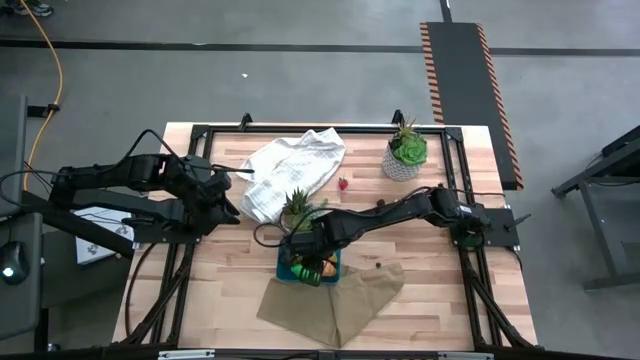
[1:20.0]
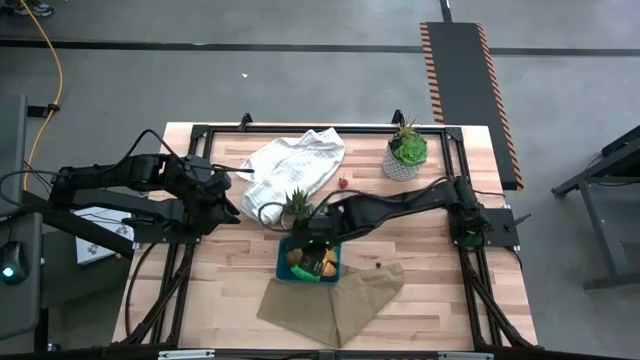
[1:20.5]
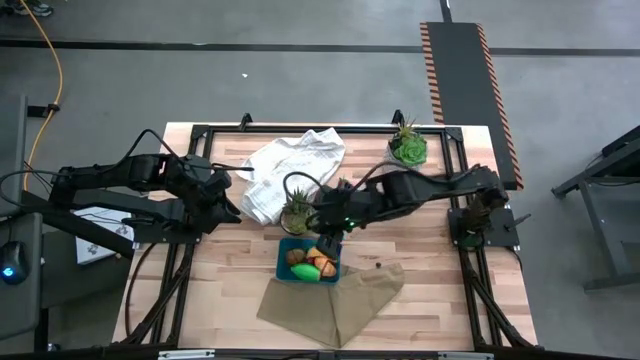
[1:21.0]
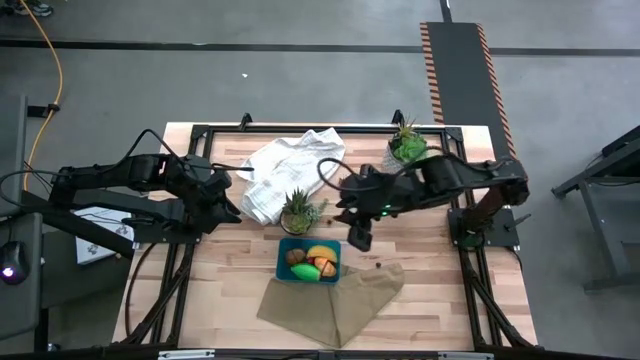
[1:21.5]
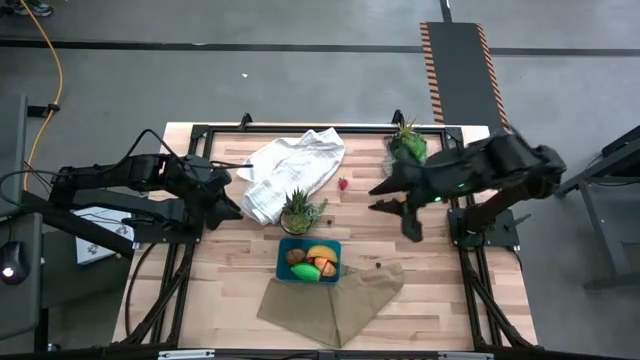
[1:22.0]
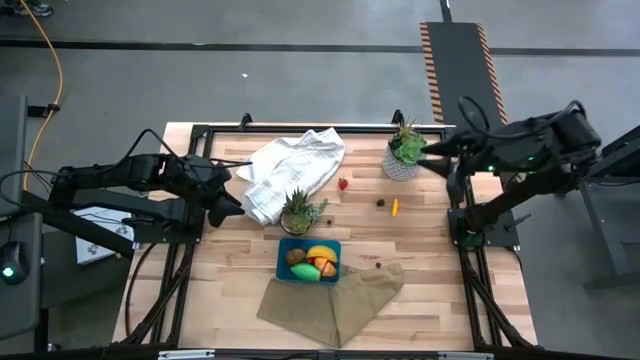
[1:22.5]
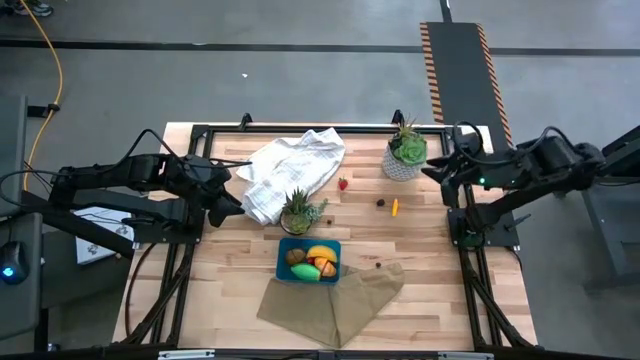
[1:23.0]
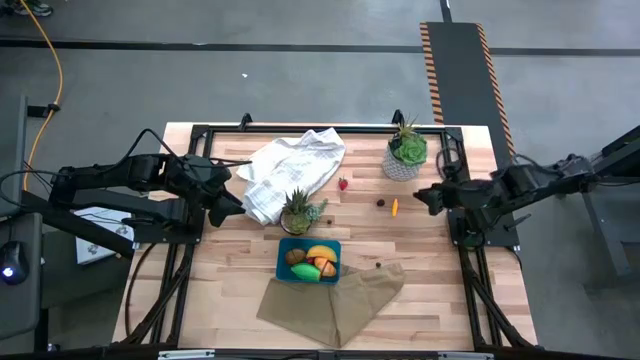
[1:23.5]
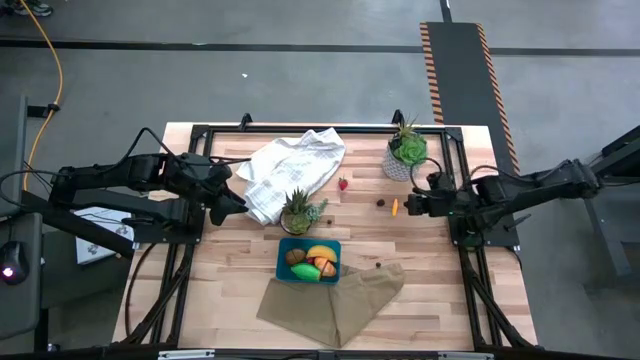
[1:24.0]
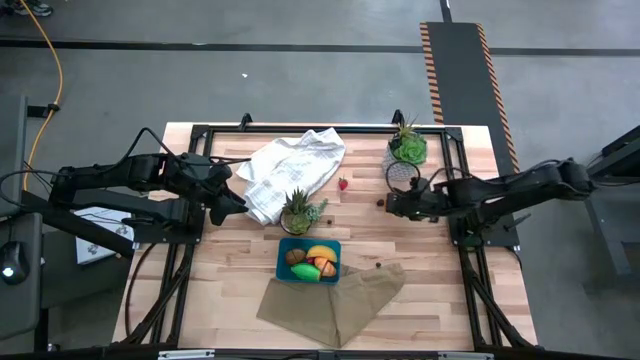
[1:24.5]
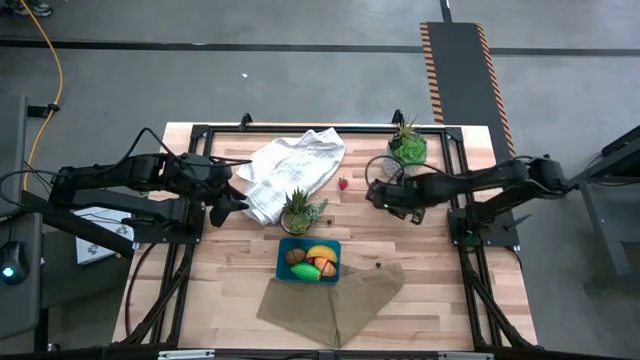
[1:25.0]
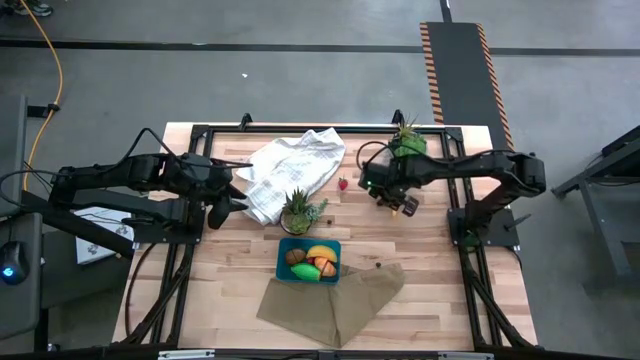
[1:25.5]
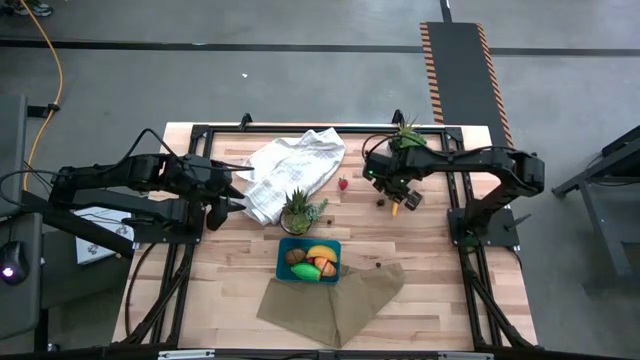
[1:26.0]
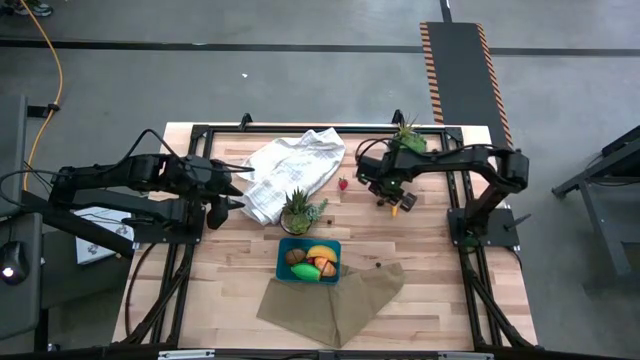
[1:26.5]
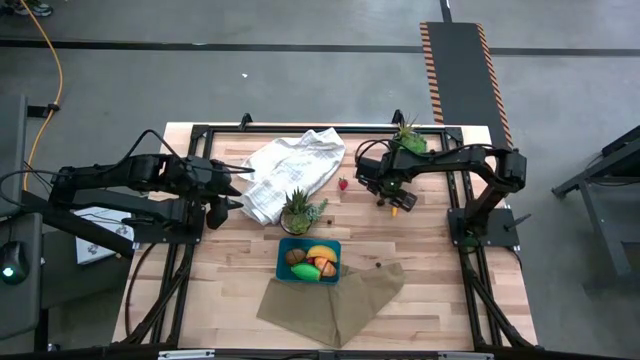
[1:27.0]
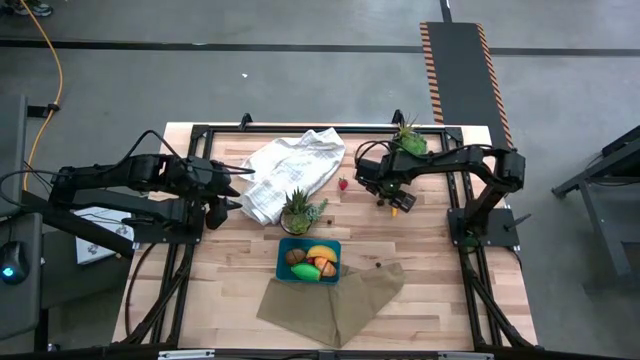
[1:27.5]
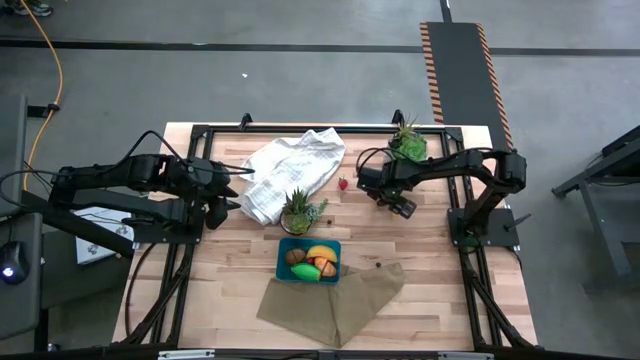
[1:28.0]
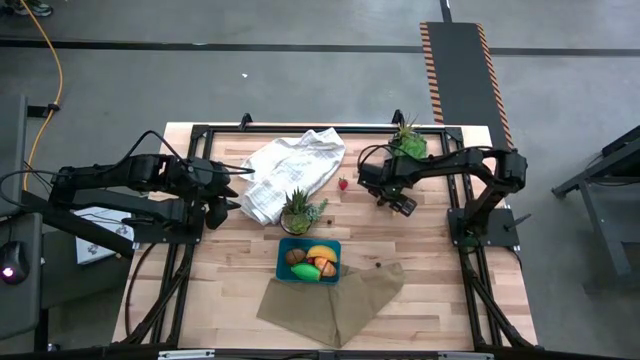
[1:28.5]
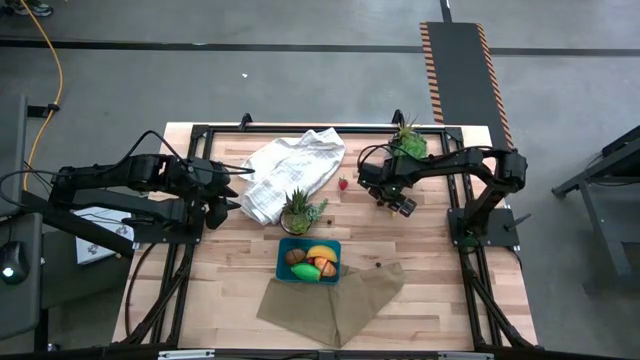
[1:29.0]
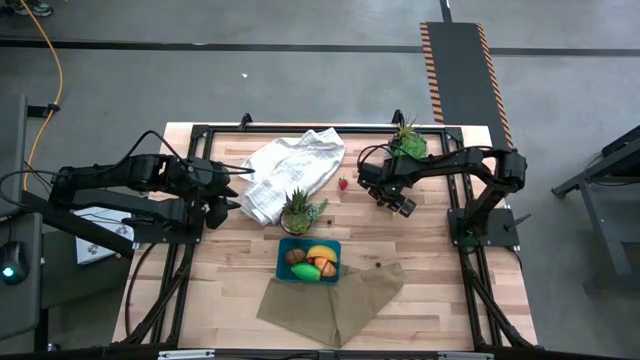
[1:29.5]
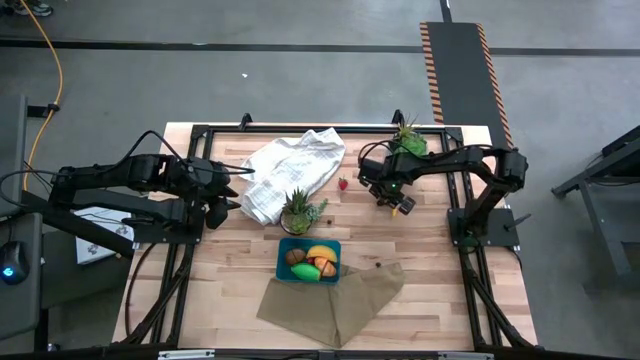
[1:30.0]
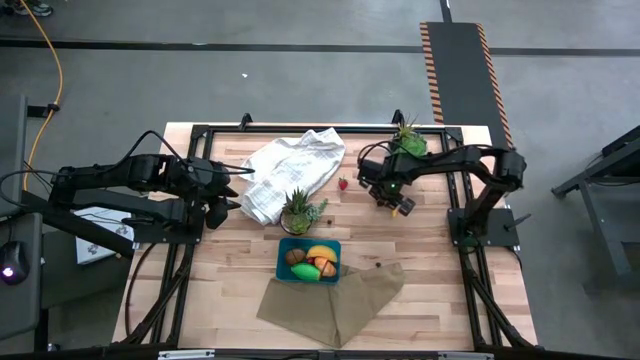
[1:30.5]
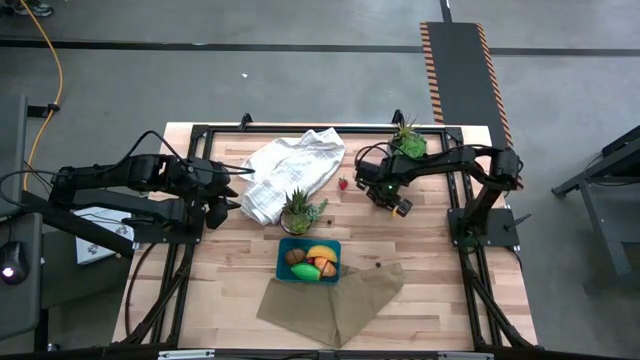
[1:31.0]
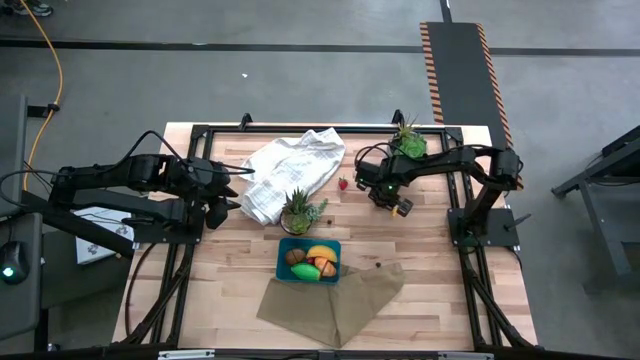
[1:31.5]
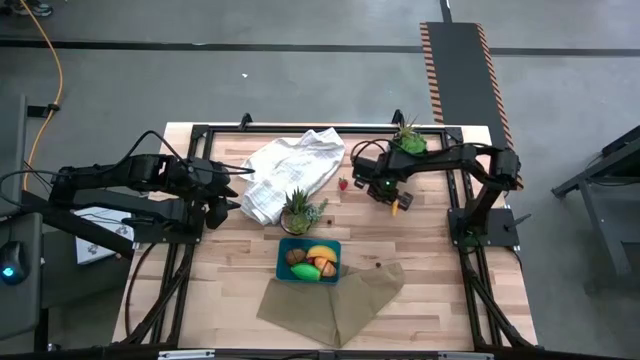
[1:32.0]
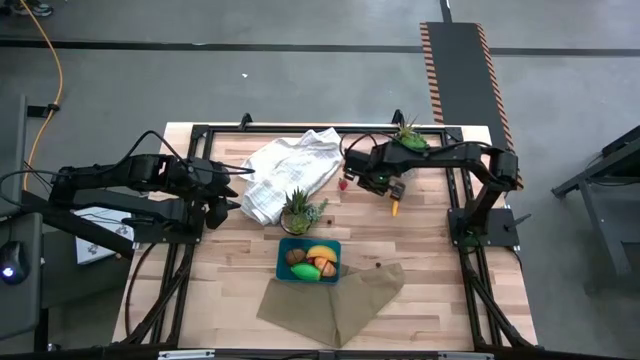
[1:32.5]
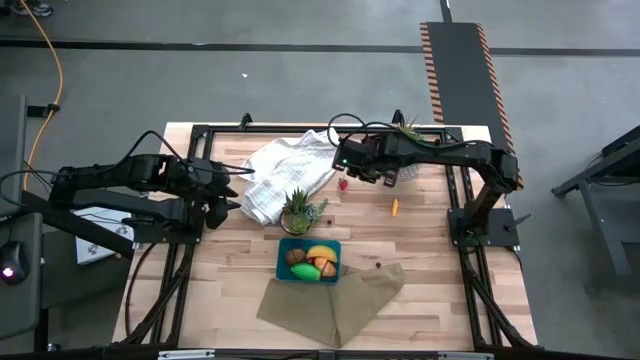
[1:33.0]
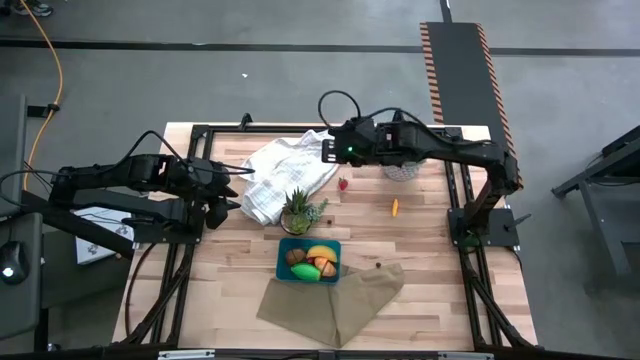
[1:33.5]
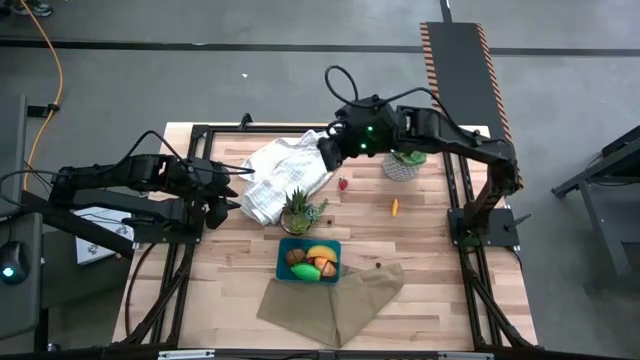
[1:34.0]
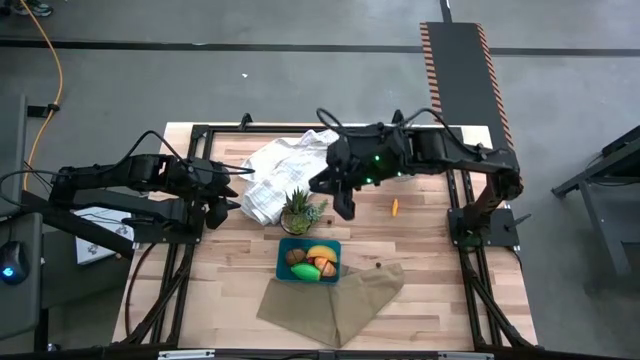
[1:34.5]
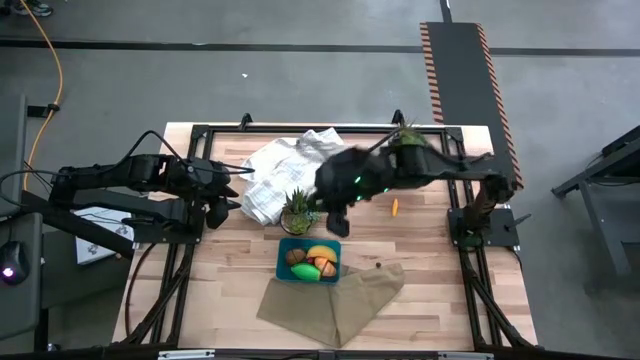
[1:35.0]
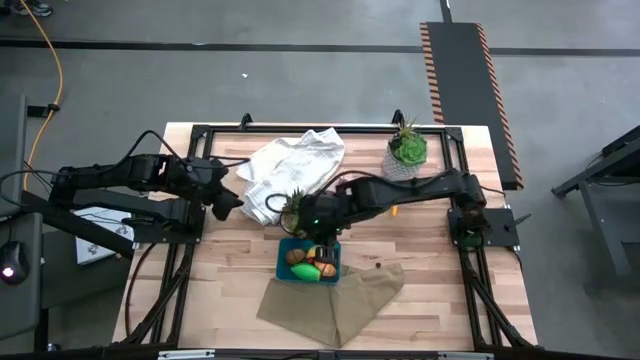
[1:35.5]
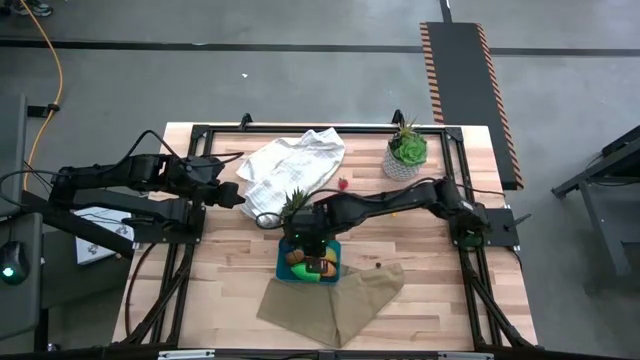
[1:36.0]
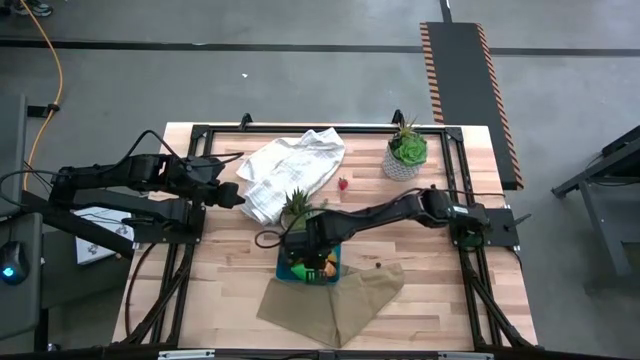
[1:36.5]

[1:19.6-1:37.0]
Task: Pick and placing Produce into tupperware
Put the blackberry into the blue bin

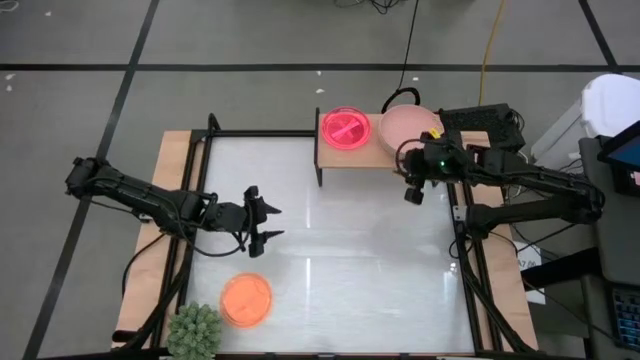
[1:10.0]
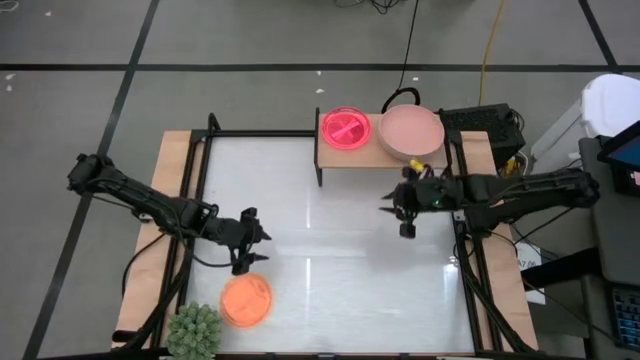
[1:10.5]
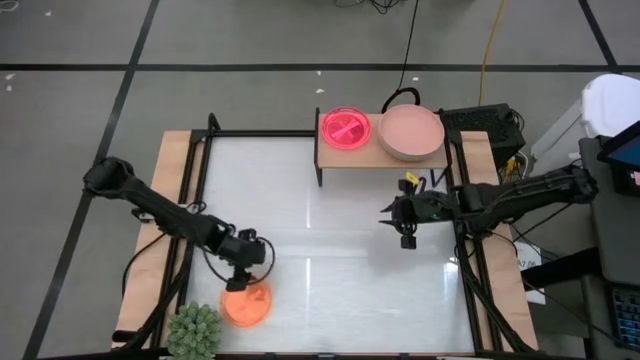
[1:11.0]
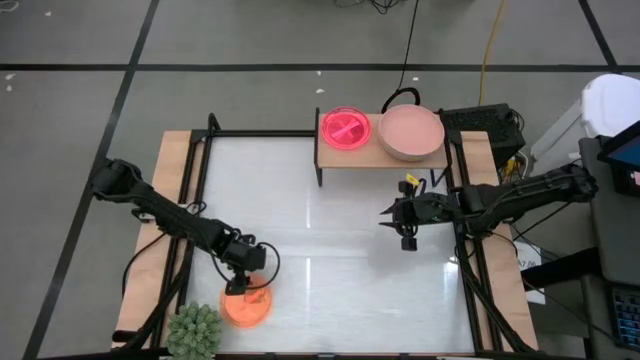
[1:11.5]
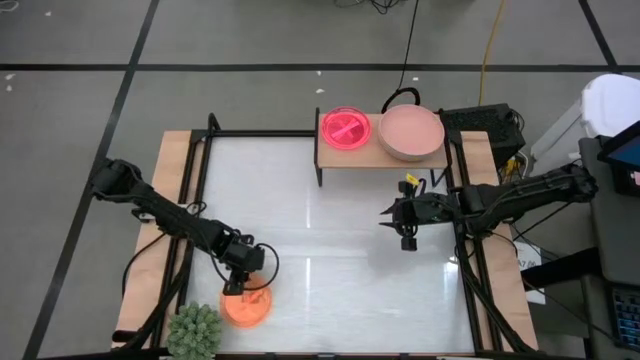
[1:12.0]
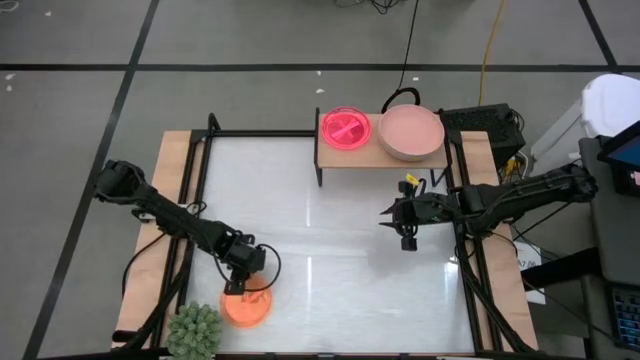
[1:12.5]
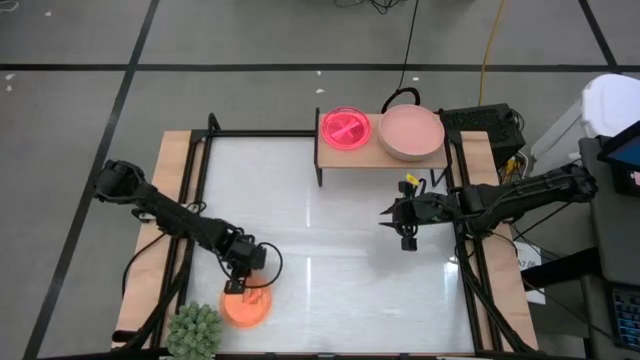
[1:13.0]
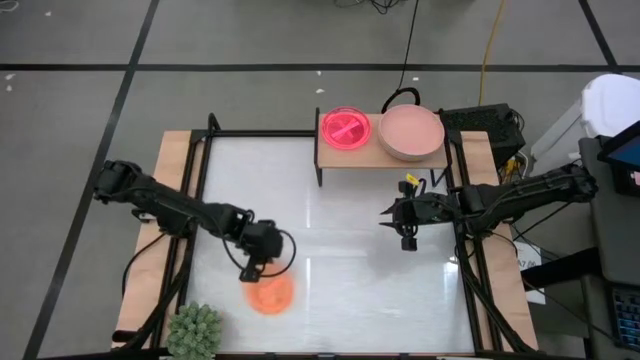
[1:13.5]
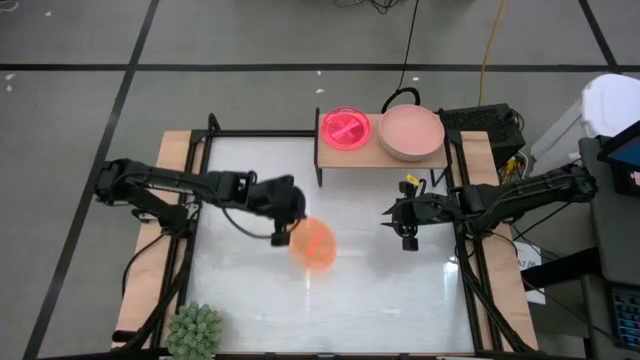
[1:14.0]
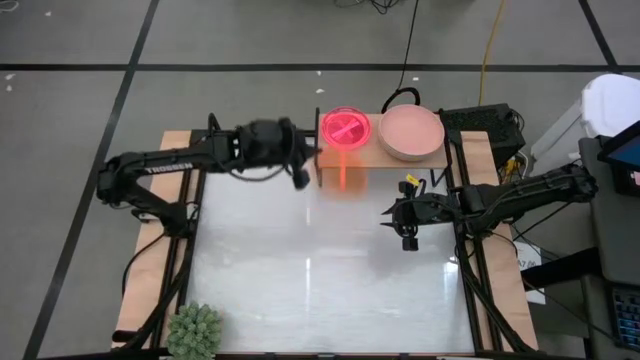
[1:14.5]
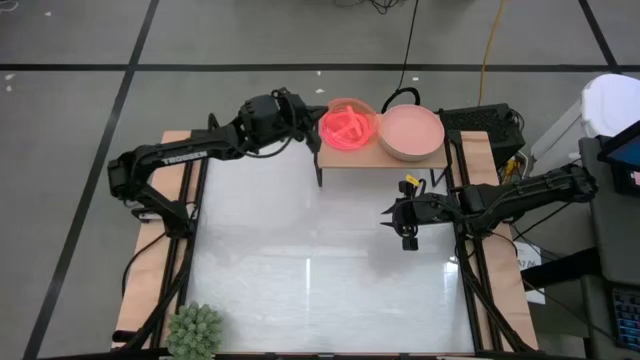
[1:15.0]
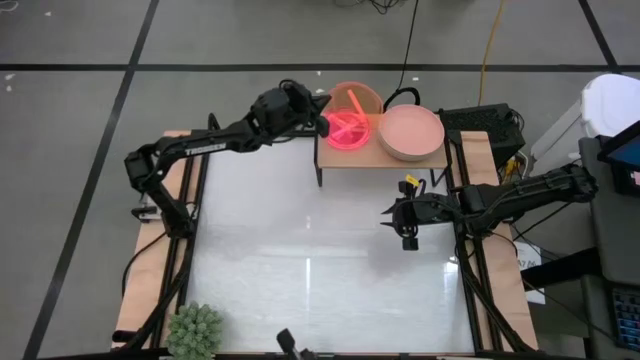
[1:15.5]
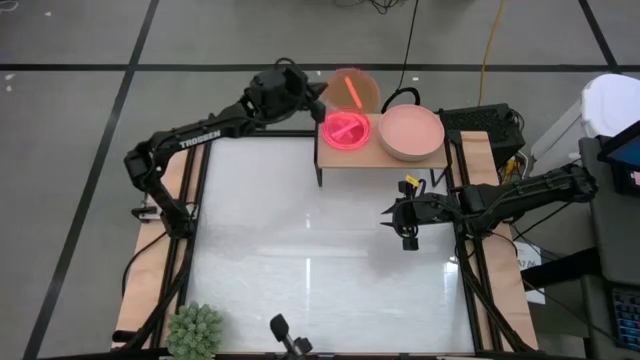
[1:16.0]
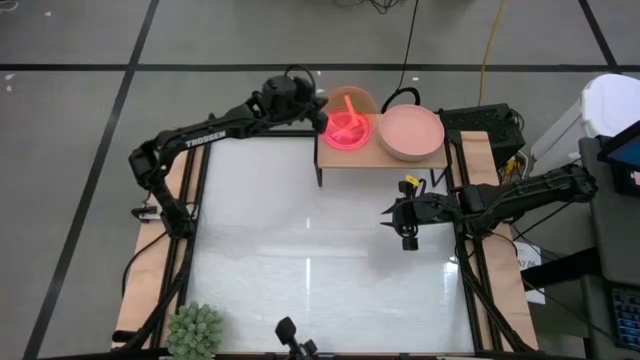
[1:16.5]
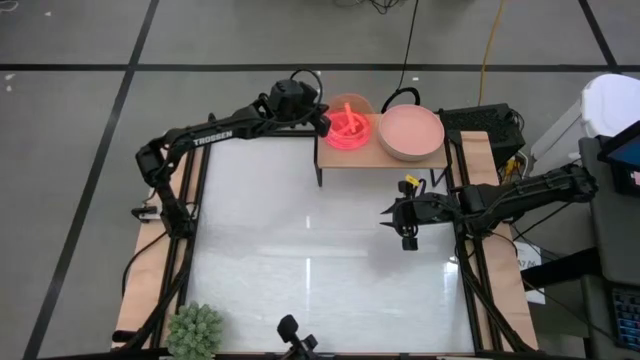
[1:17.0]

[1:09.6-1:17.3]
Task: Place and stack plates onto a shelf
Stack the orange plate on top of the pink plate on the shelf
